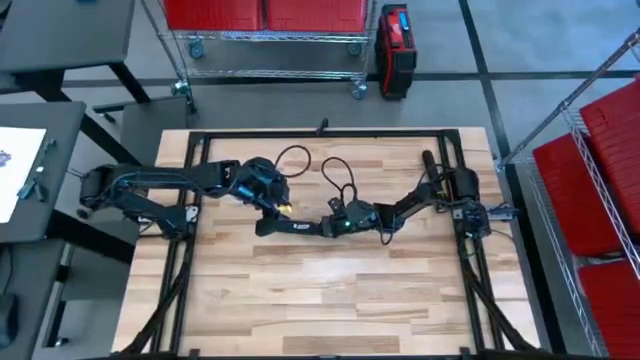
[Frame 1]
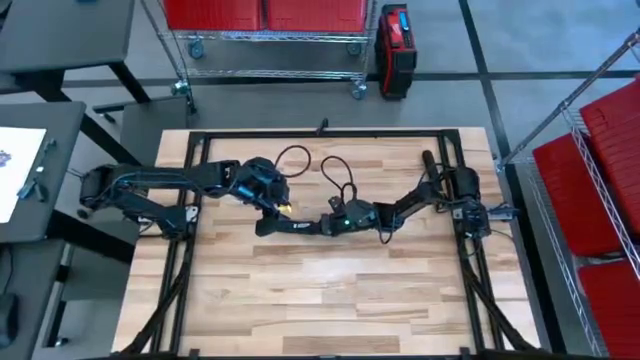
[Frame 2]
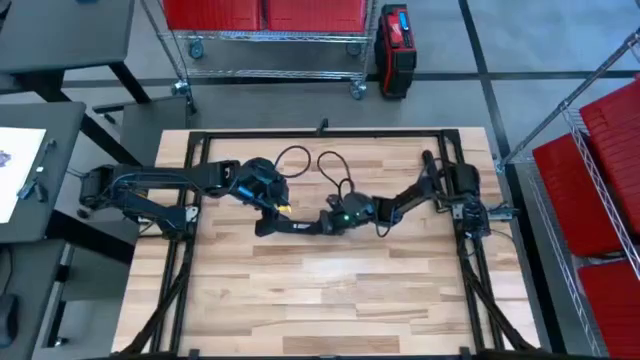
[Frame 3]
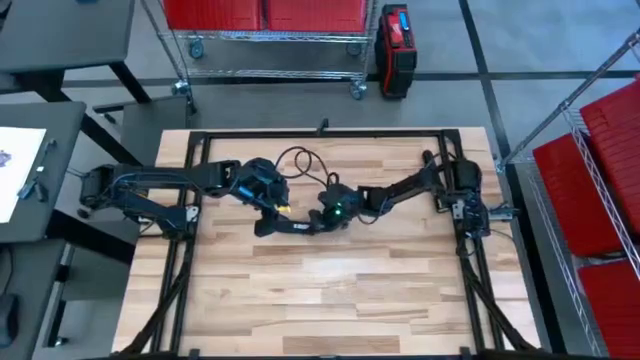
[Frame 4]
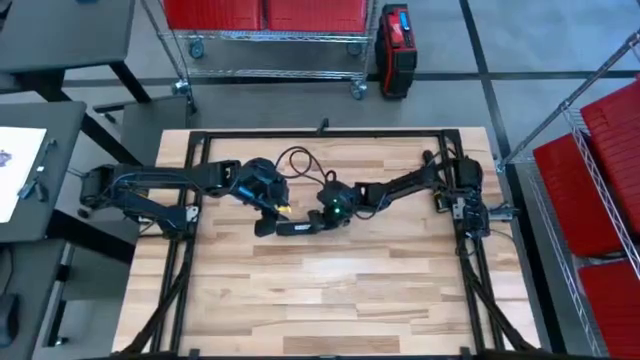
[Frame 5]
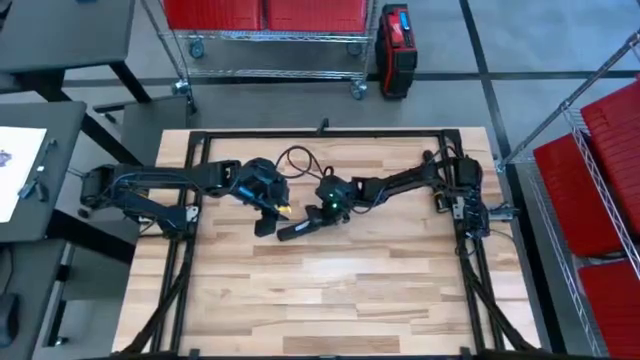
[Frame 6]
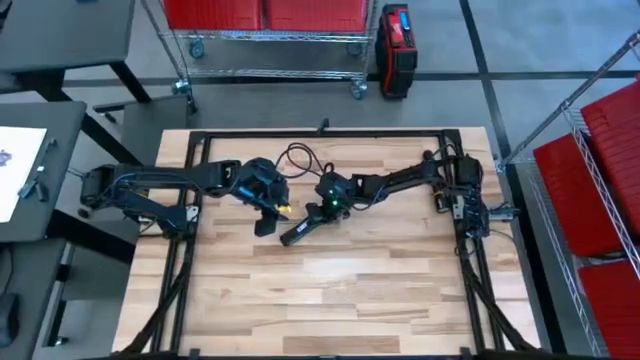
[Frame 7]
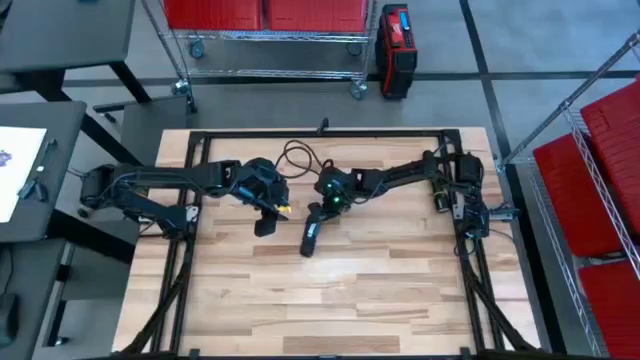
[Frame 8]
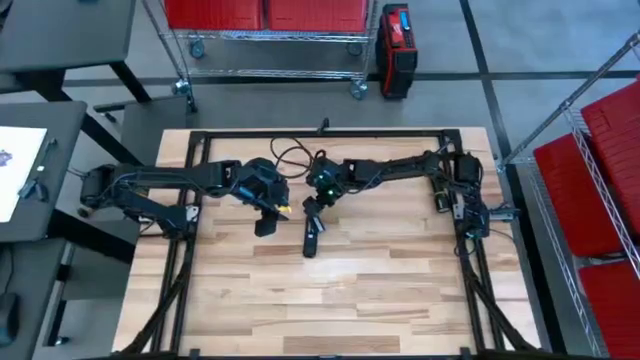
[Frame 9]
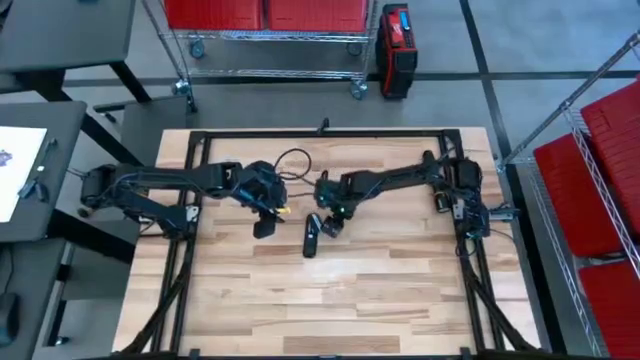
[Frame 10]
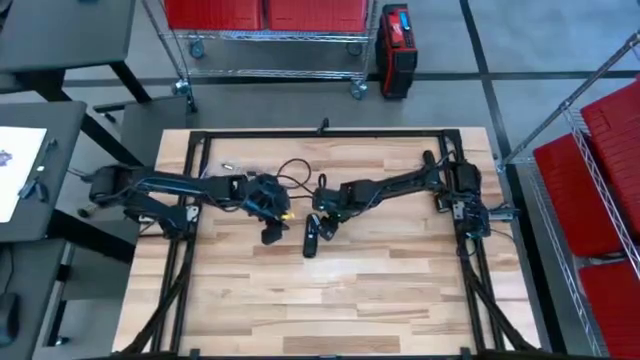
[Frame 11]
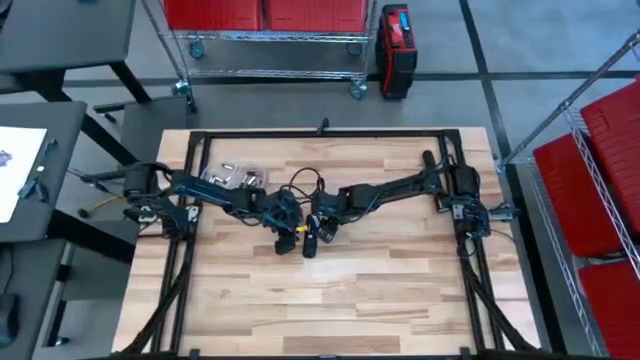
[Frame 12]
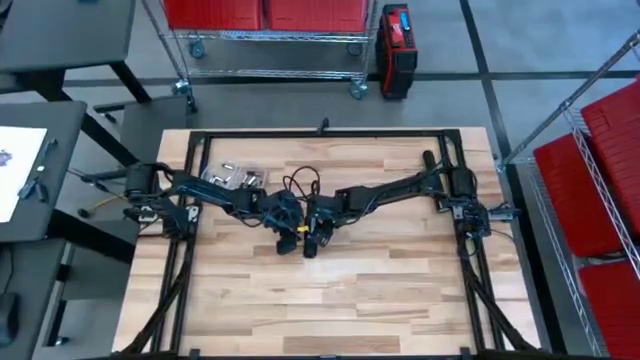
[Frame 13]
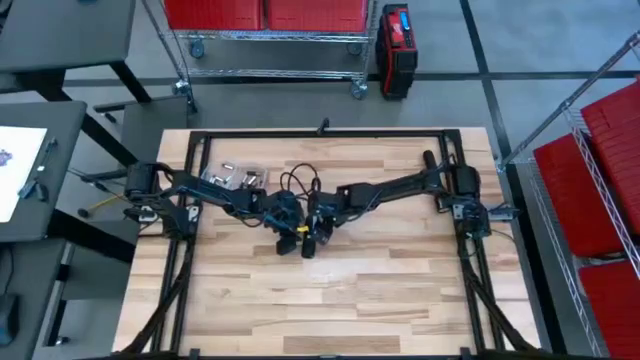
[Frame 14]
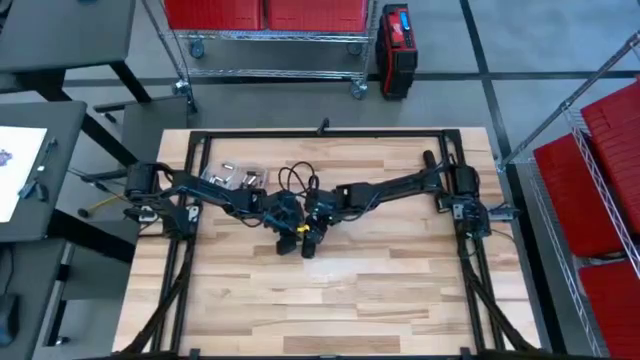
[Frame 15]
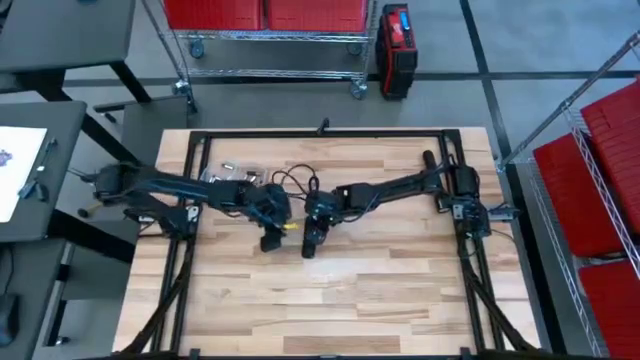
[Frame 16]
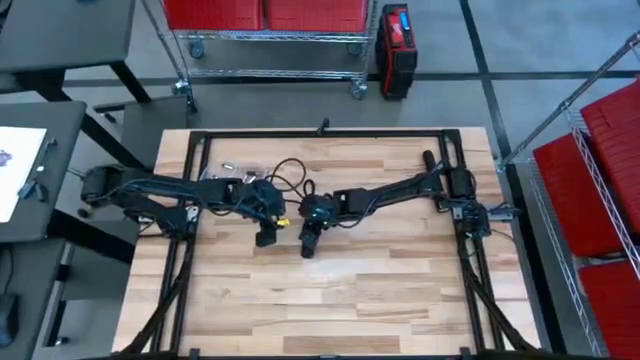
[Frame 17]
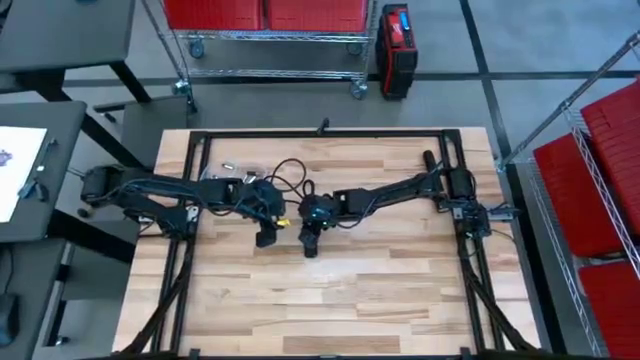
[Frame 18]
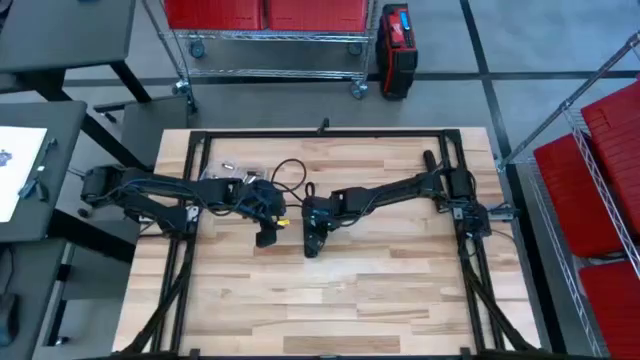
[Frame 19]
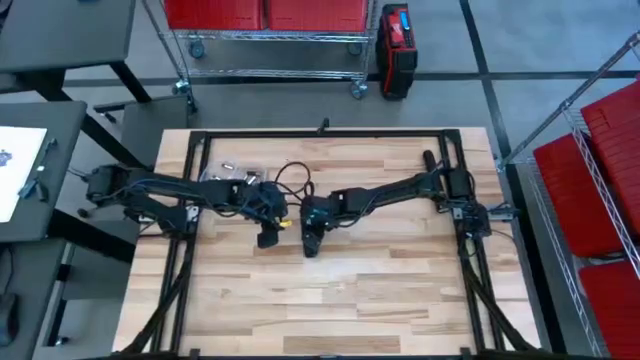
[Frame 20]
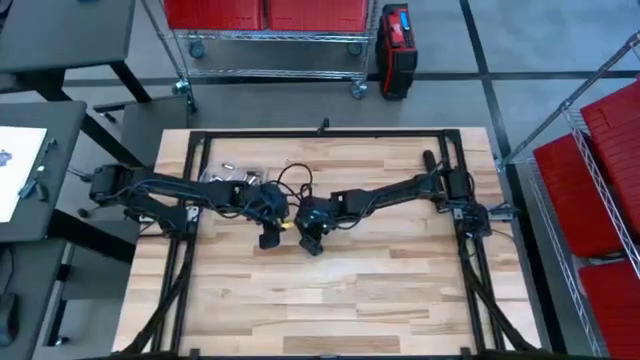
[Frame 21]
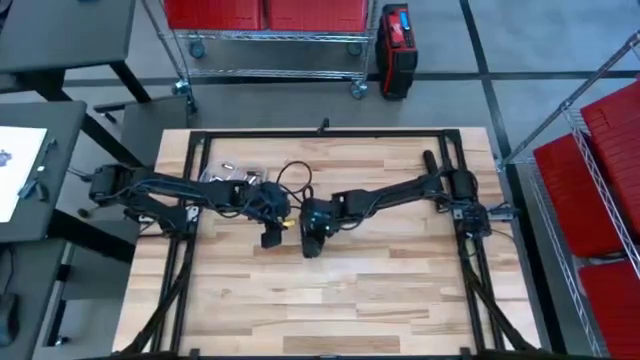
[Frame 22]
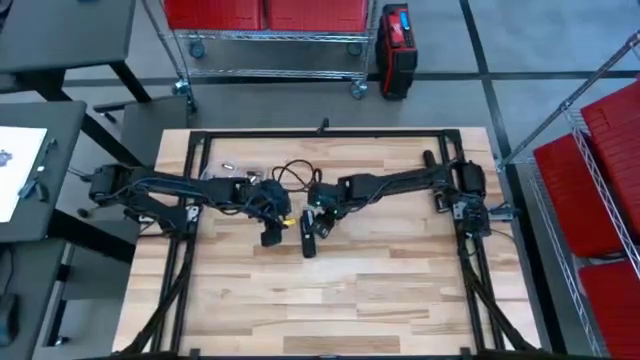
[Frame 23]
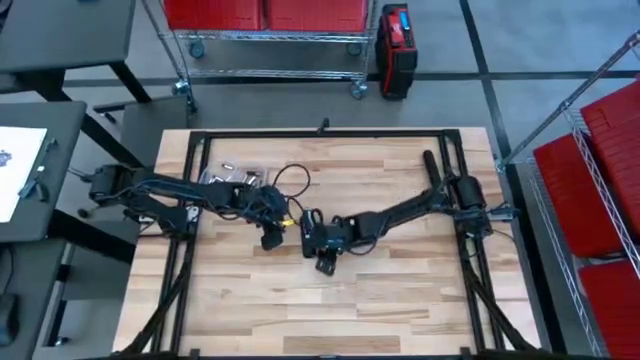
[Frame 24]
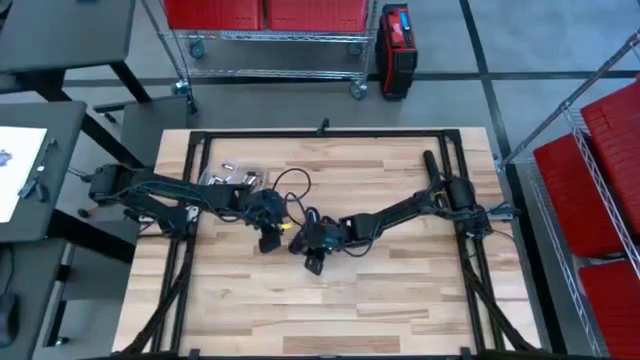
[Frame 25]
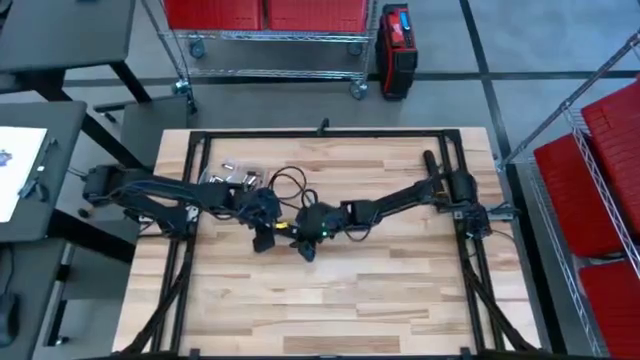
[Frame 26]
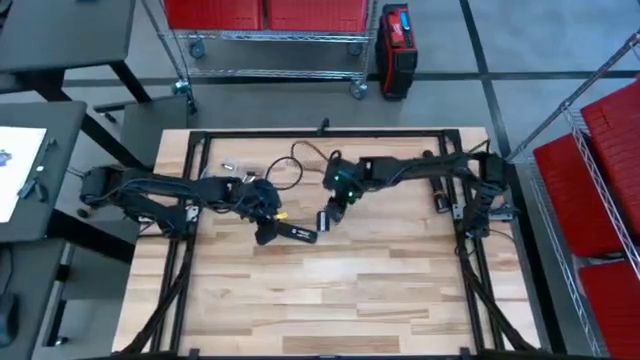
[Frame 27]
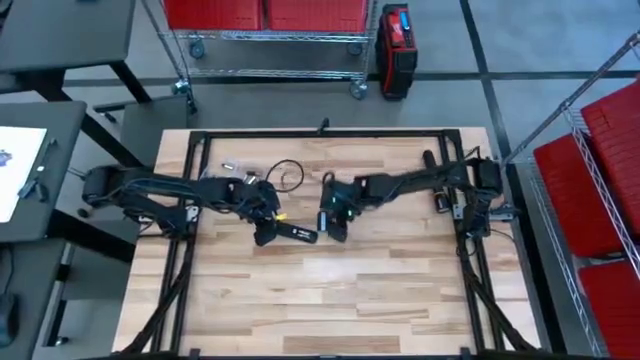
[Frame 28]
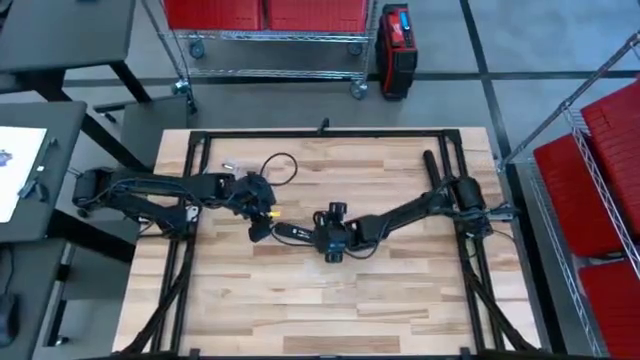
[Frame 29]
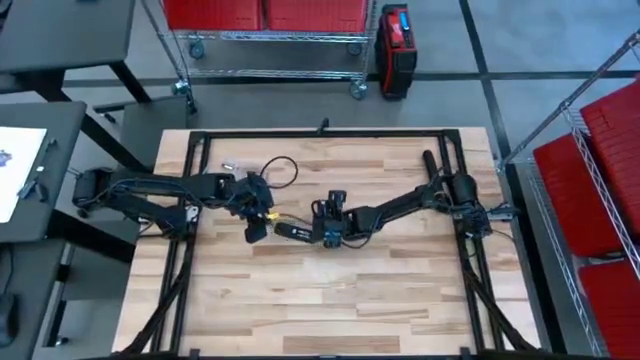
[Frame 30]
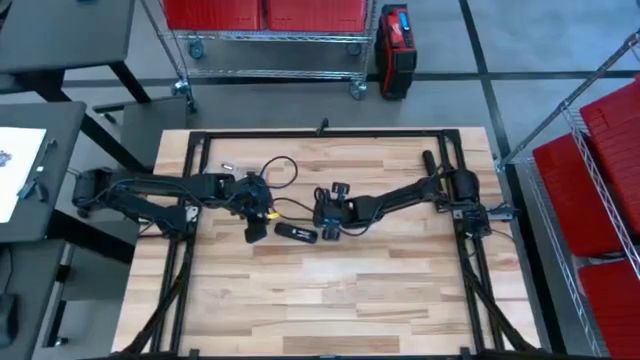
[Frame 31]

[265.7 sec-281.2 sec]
Task: Insert battery
Close the remote's battery compartment

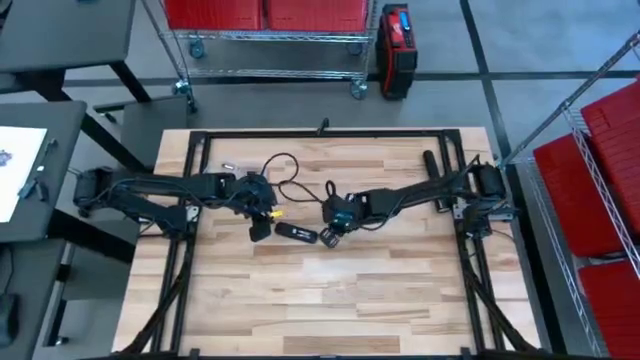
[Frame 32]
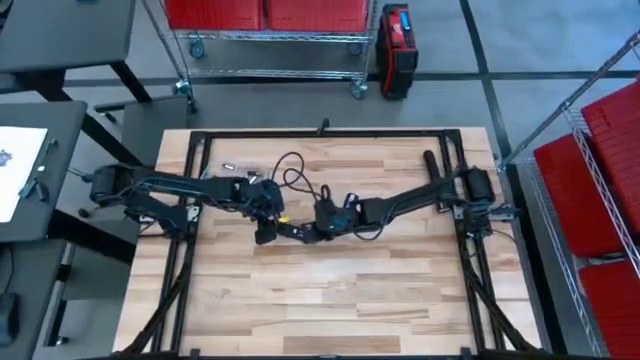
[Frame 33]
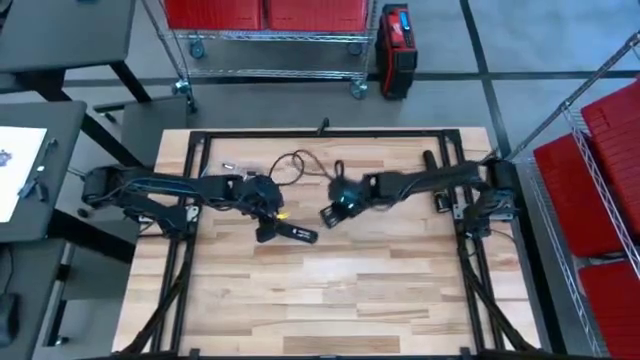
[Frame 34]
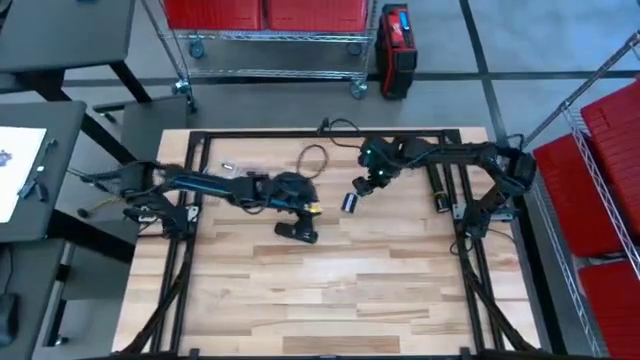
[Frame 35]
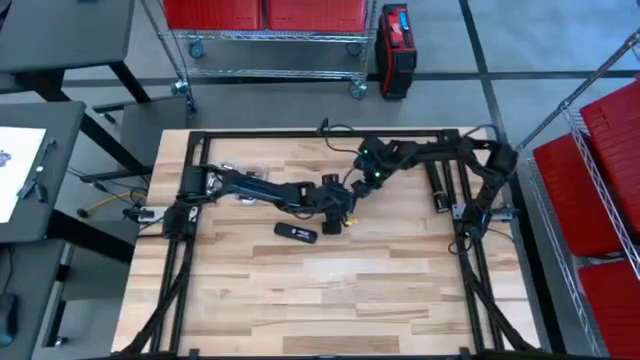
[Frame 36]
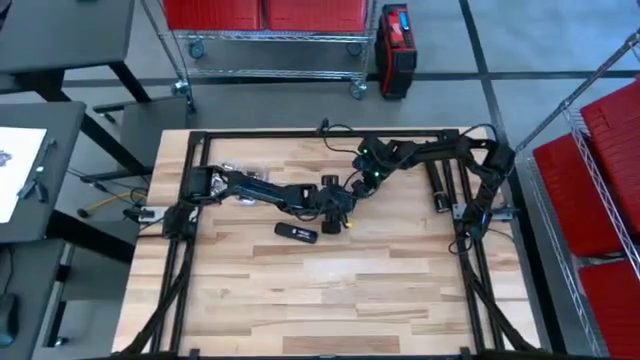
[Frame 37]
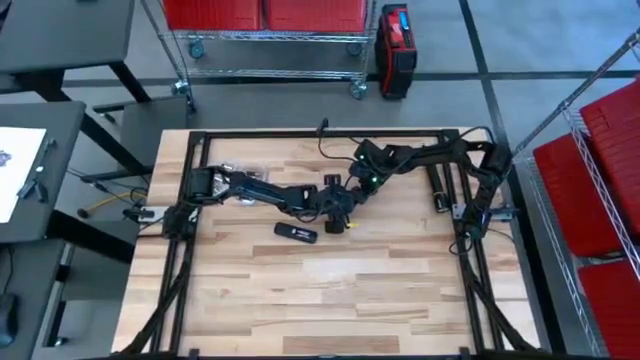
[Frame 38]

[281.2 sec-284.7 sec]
Close the remote's battery compartment

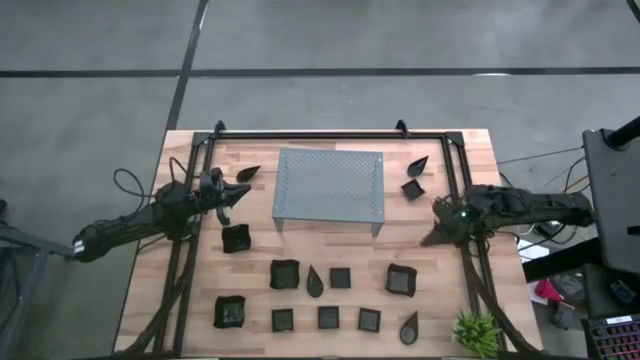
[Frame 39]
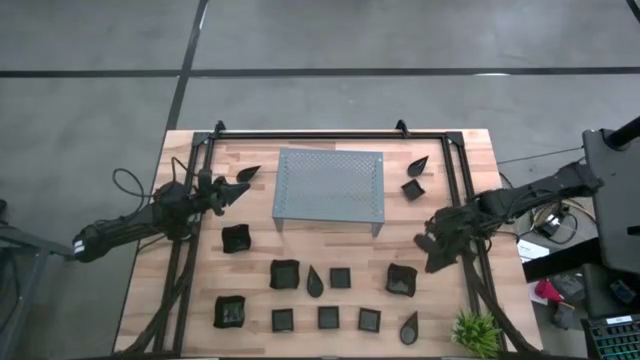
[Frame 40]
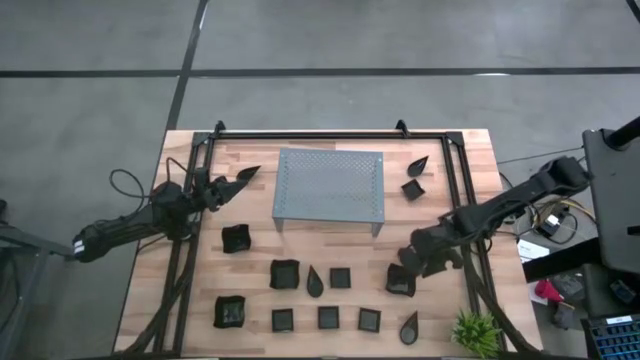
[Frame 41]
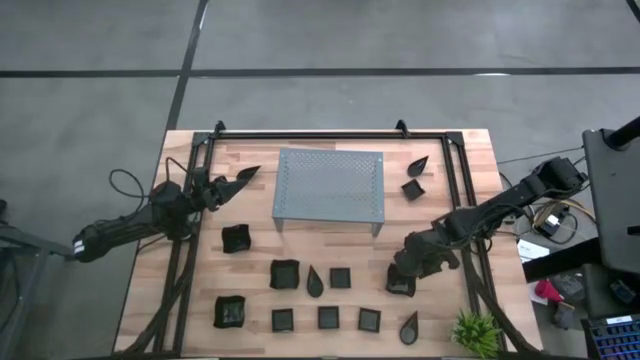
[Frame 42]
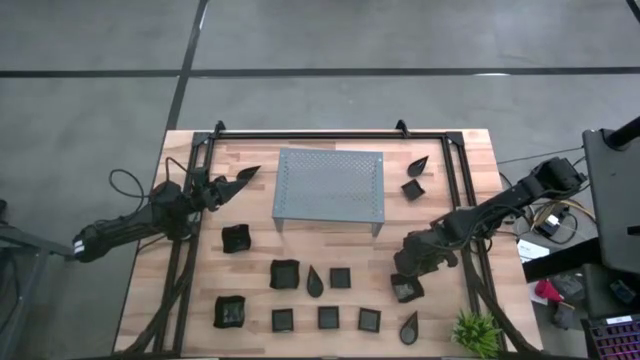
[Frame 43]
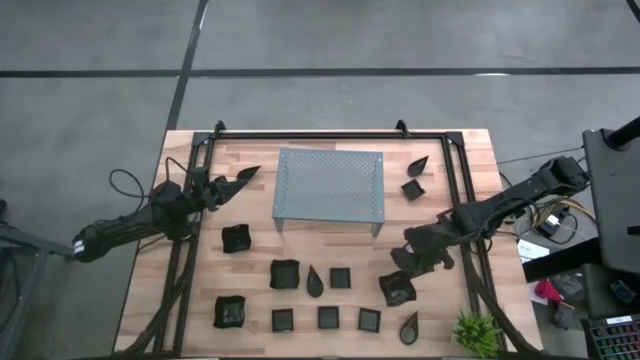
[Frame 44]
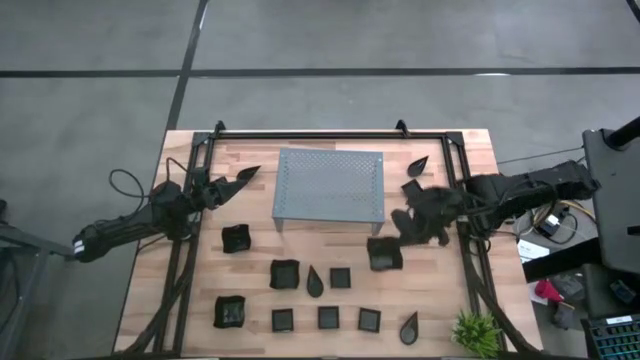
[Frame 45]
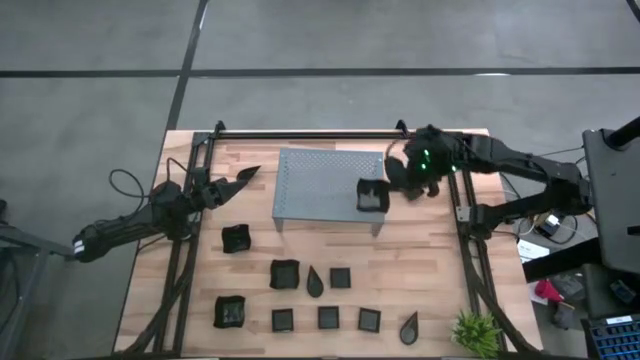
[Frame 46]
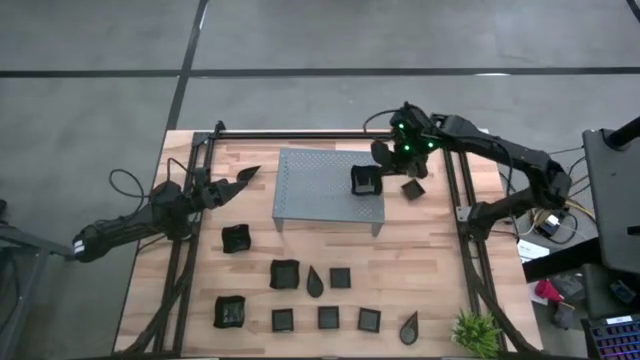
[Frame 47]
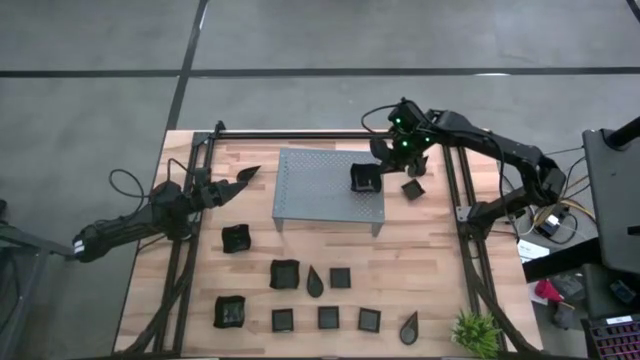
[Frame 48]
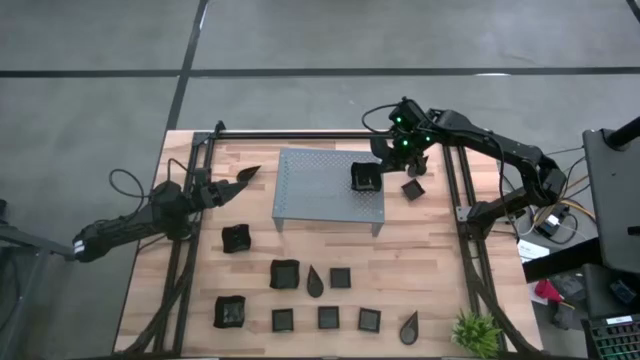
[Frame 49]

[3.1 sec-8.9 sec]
Task: Pick & Place Mini shaped plates
Put the black distorted square plate on the shelf
